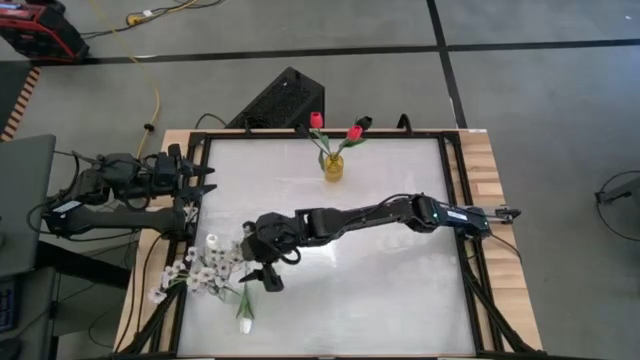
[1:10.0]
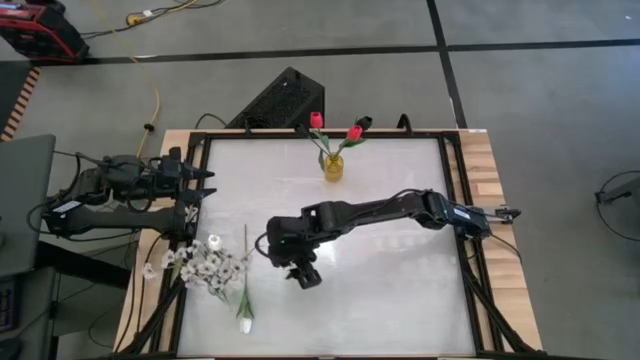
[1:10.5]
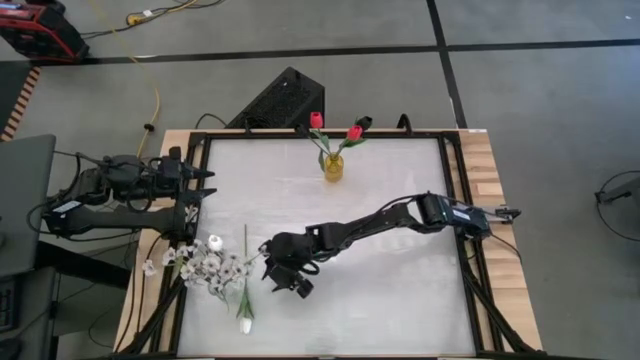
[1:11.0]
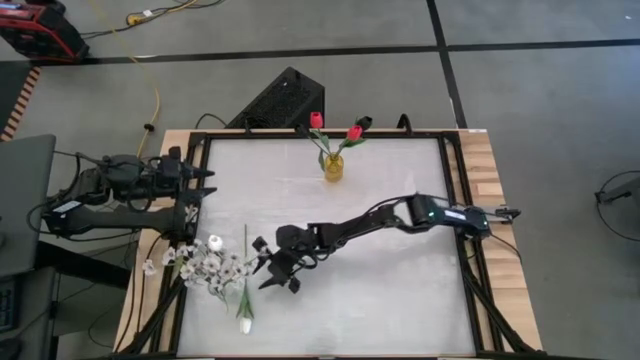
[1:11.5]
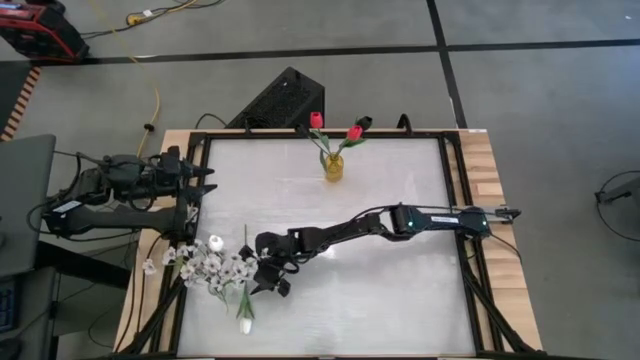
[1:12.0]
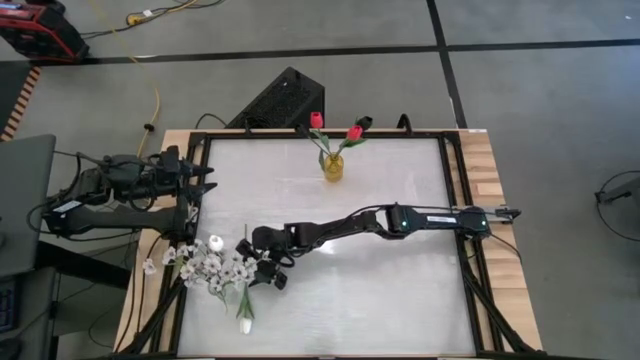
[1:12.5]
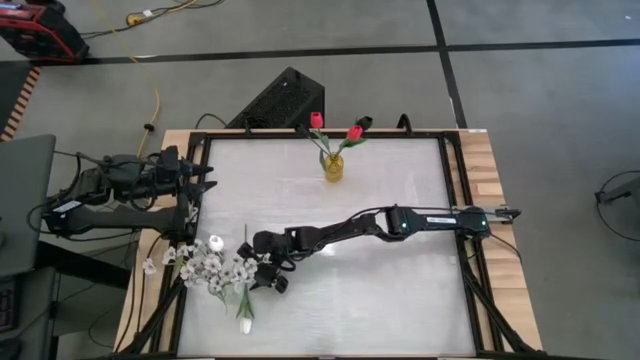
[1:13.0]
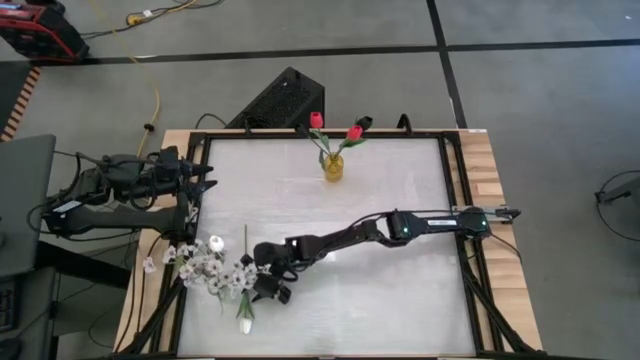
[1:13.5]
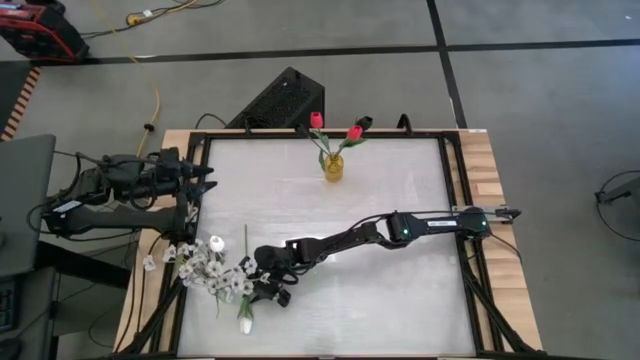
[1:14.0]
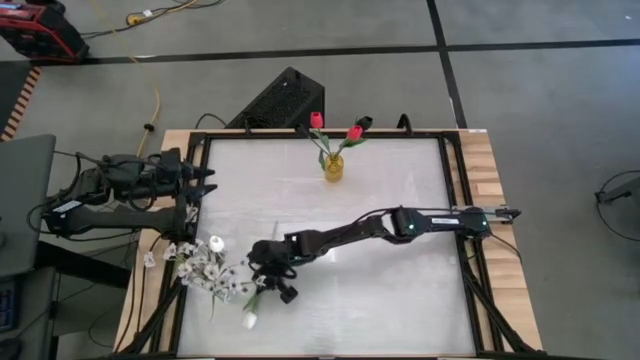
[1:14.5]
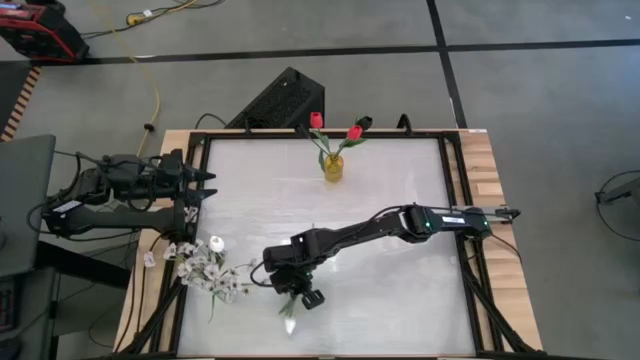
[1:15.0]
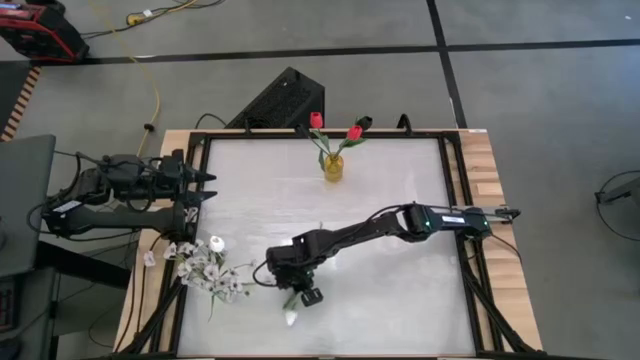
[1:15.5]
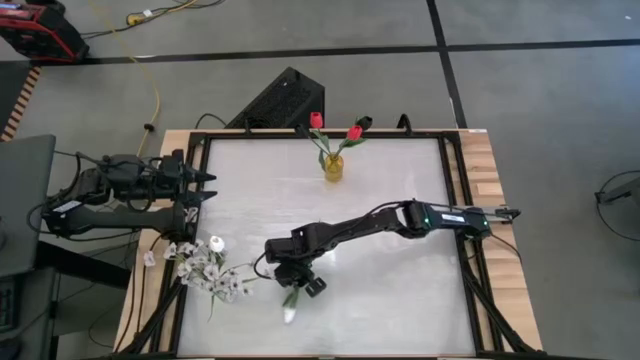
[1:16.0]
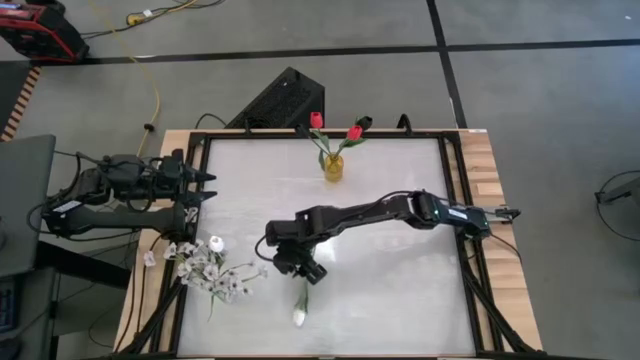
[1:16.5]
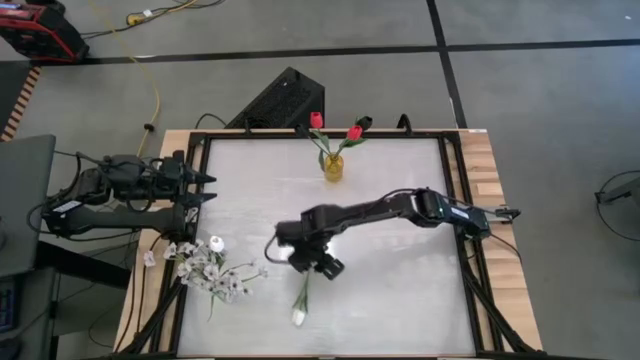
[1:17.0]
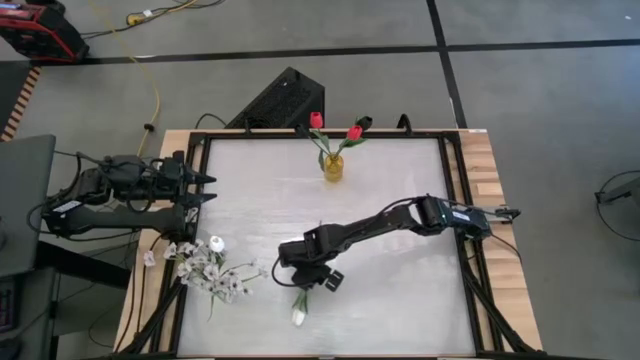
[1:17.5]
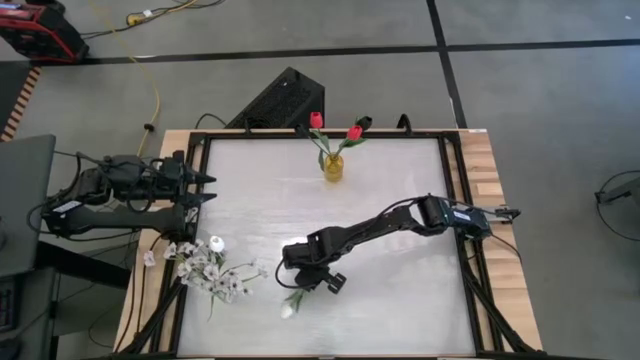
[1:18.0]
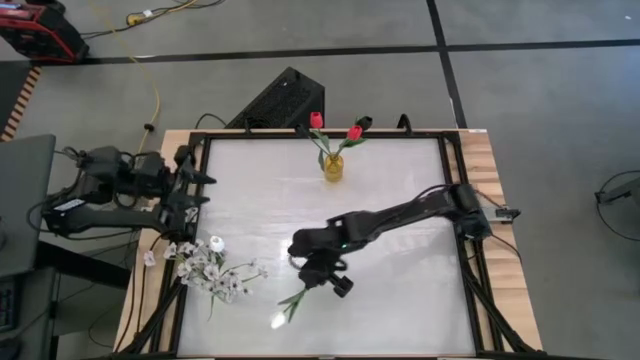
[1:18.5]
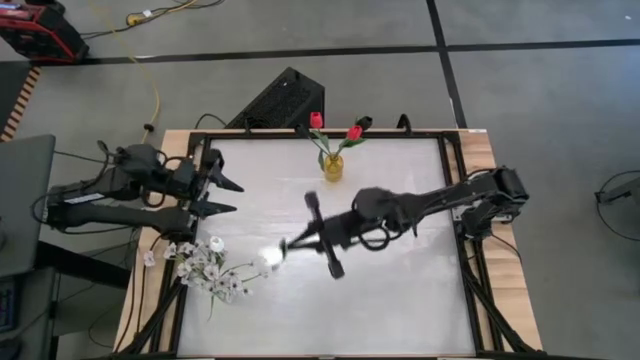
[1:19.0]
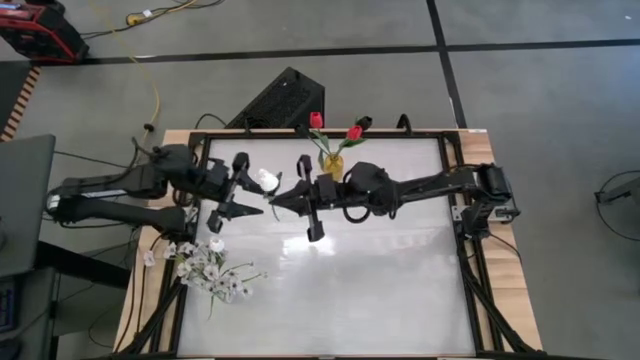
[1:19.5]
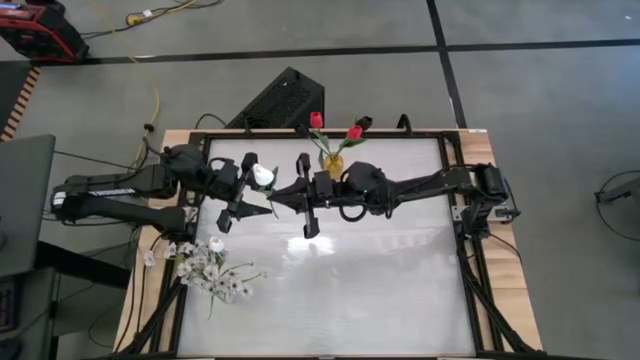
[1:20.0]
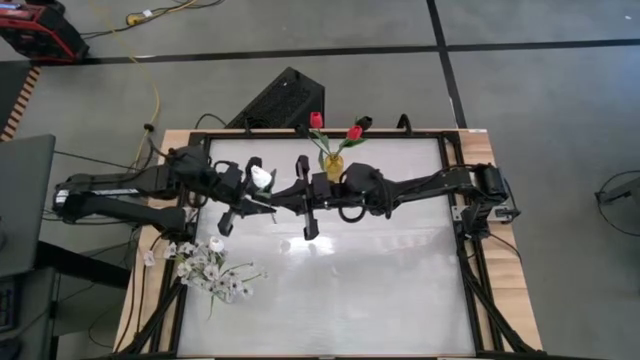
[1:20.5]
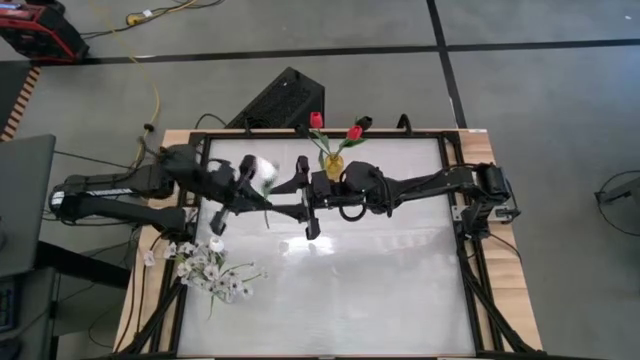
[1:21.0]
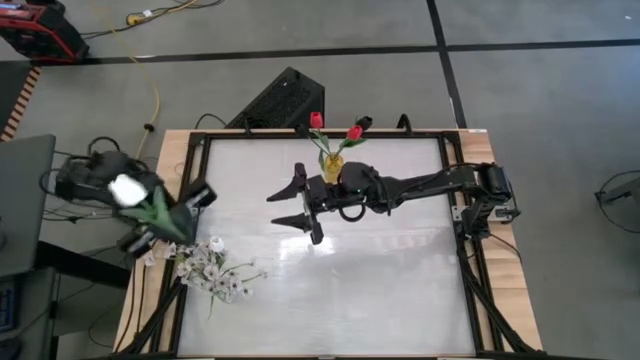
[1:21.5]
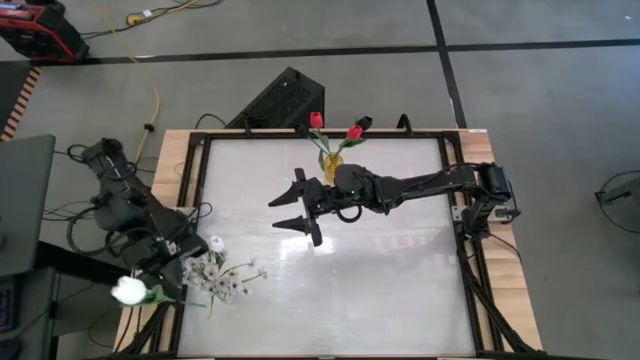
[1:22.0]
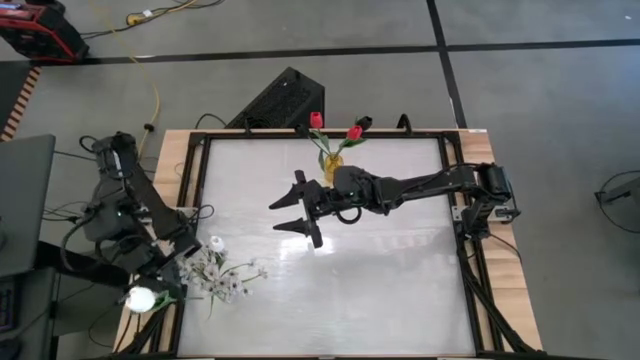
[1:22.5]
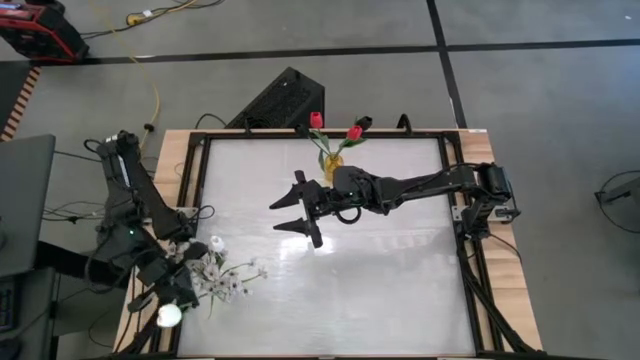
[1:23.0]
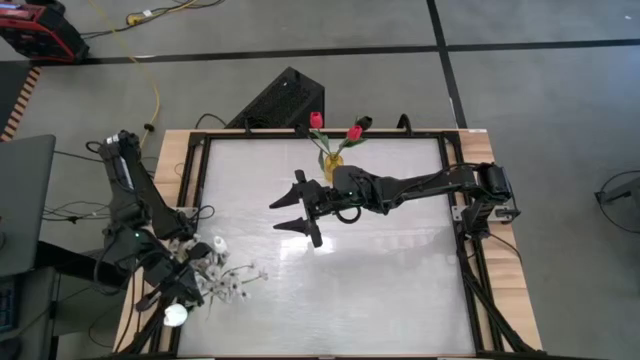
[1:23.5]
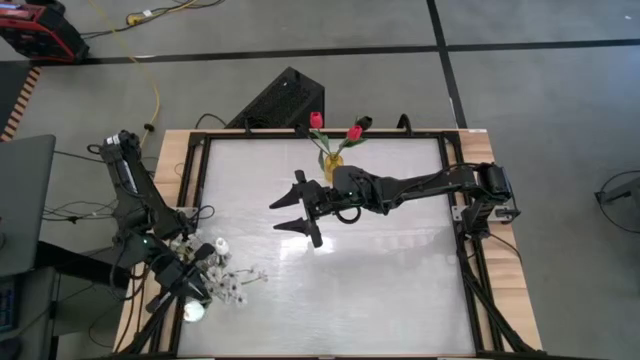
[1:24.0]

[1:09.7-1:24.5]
Task: Sort flowers into vase by color
Put the white flower into the transparent vase

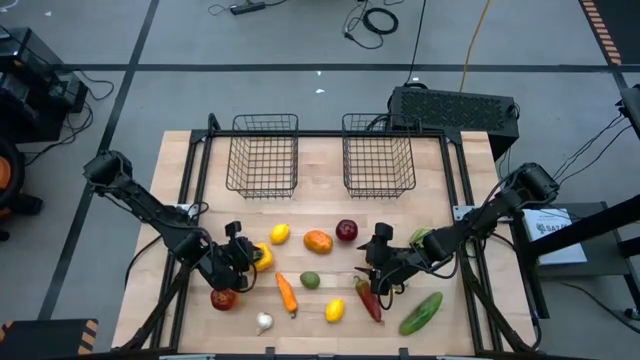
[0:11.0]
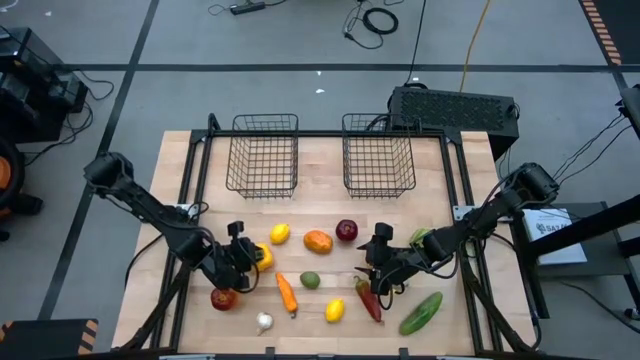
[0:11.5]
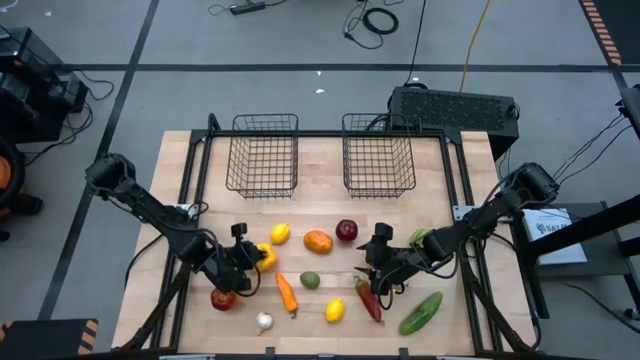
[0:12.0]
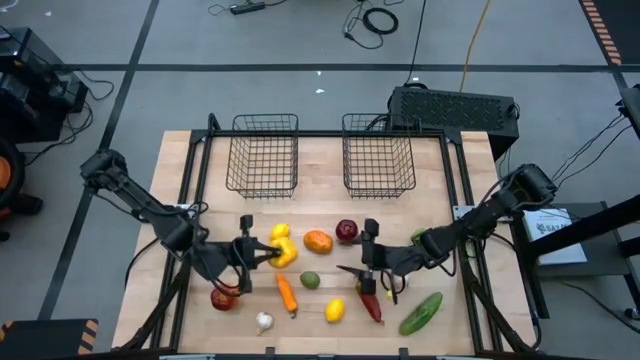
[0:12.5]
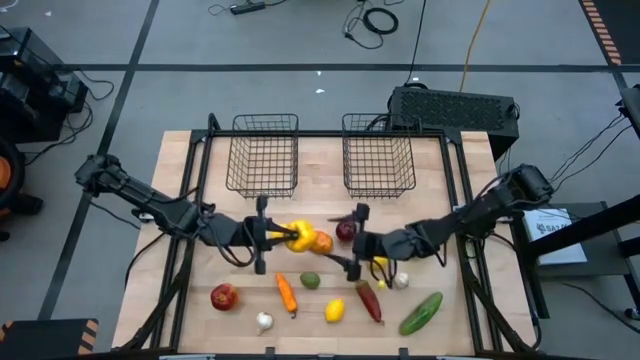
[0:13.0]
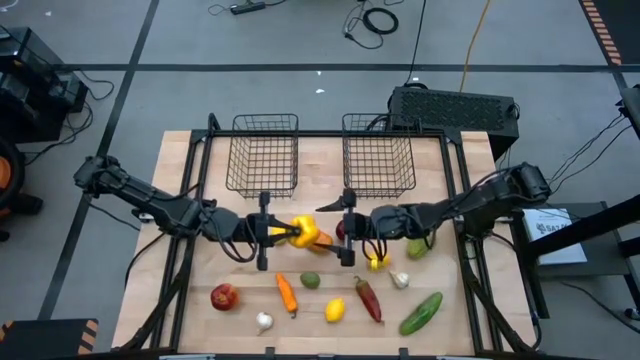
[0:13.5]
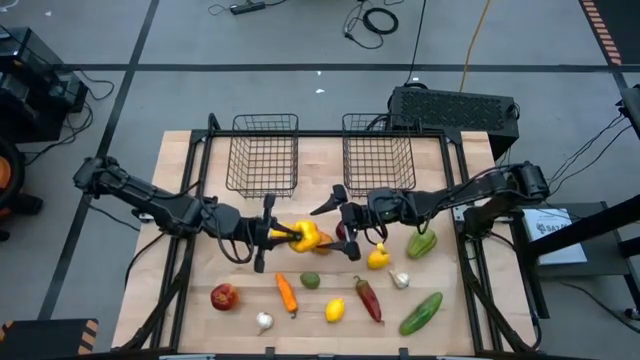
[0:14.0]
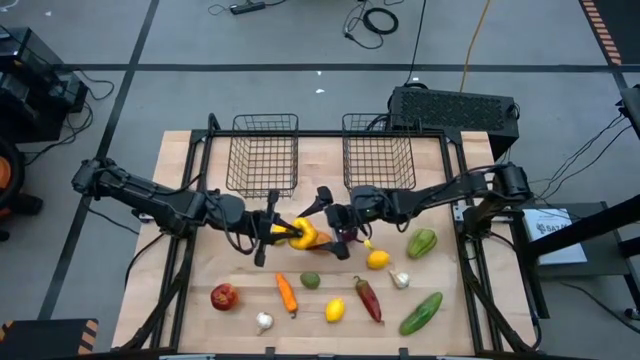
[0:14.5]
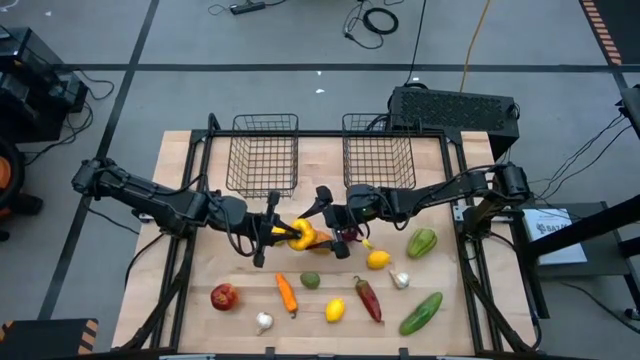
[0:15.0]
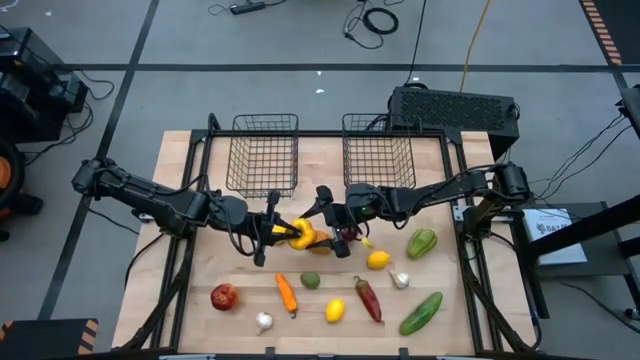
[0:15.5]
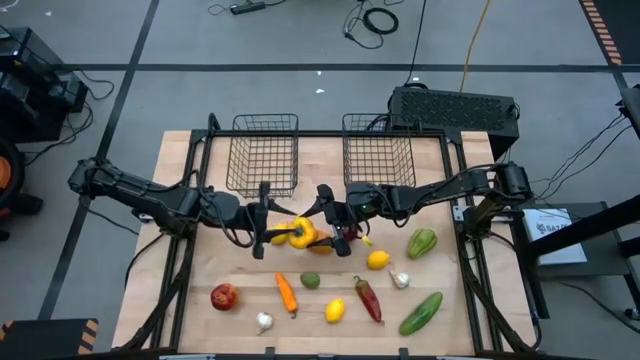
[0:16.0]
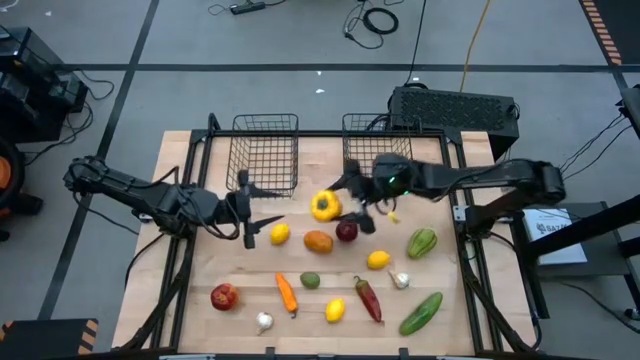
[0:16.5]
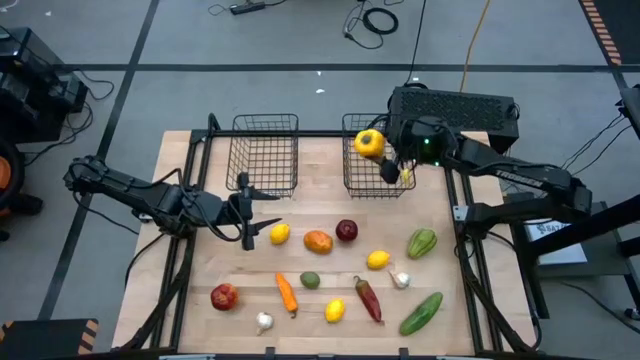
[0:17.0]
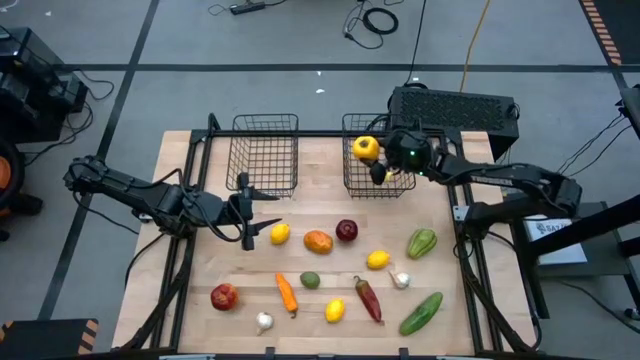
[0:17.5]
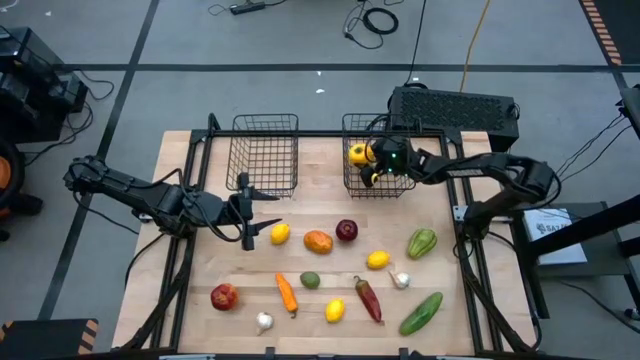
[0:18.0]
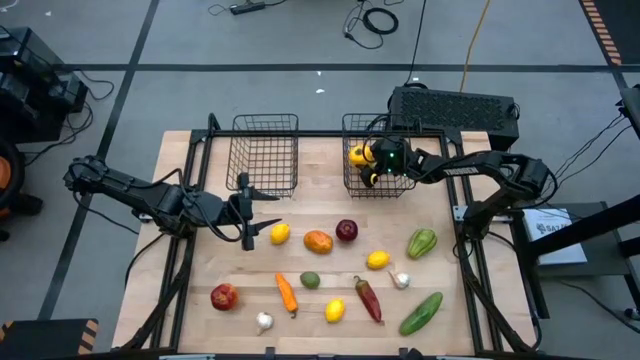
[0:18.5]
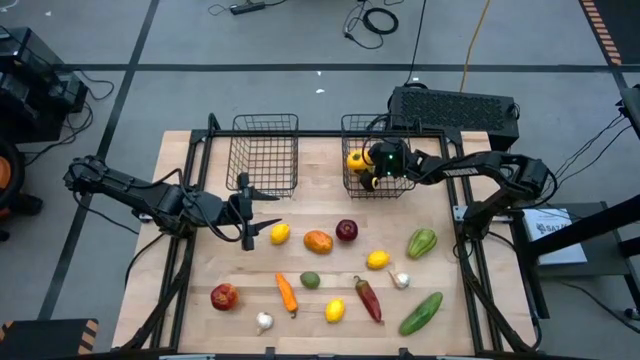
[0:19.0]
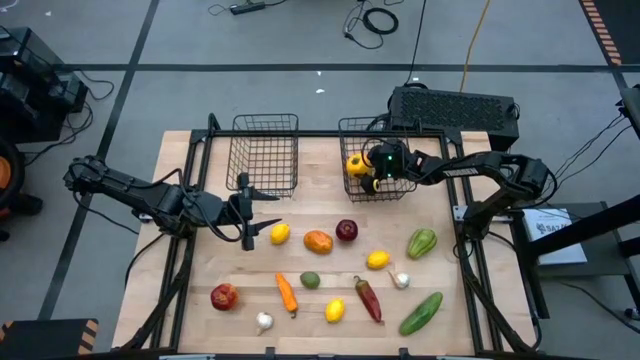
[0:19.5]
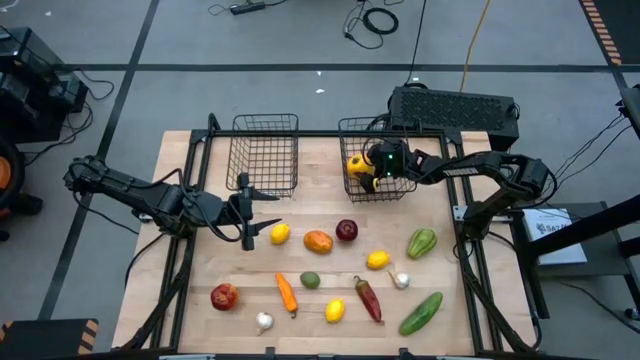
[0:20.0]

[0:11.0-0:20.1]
Task: Sort produce into baskets
Put the yellow bell pepper into the right mesh basket
